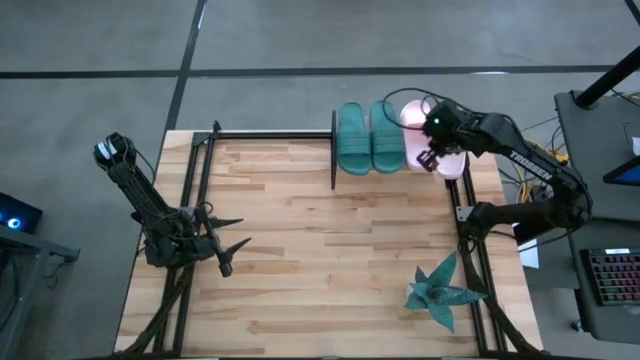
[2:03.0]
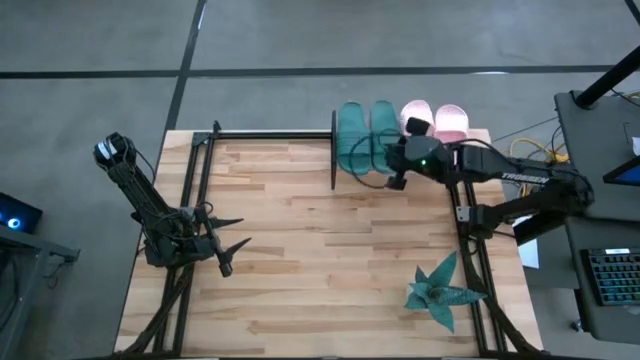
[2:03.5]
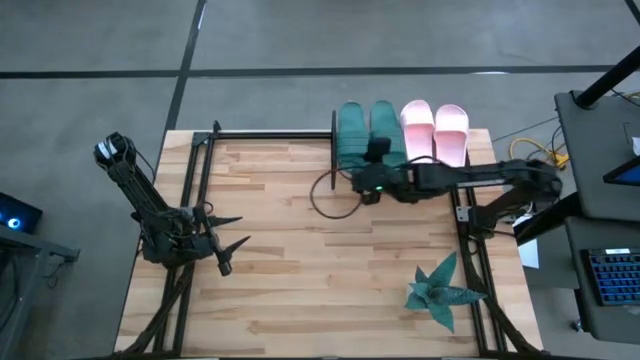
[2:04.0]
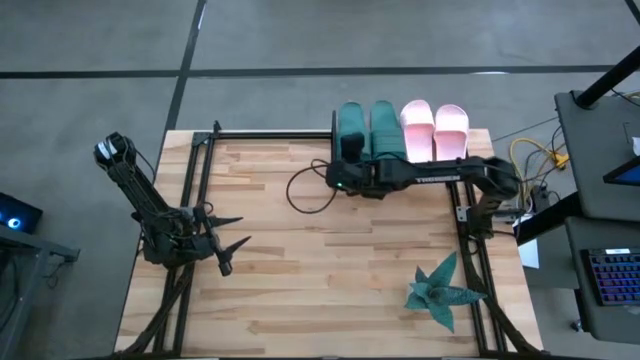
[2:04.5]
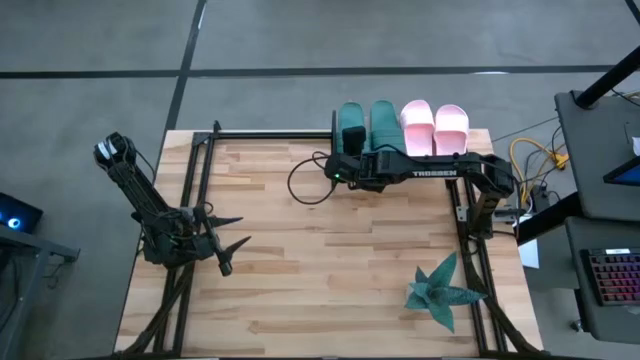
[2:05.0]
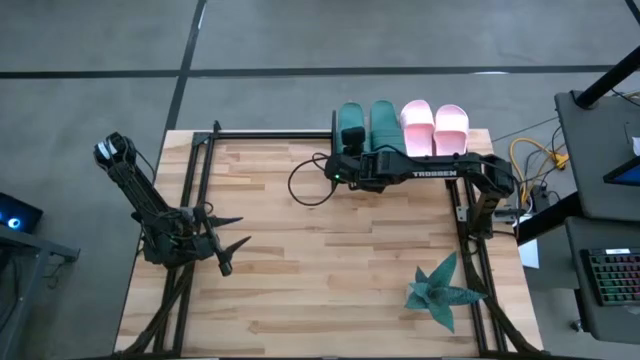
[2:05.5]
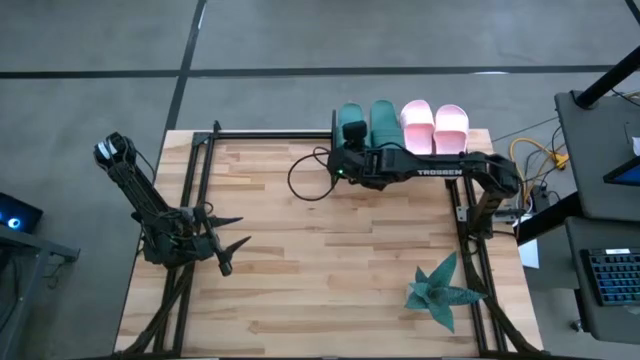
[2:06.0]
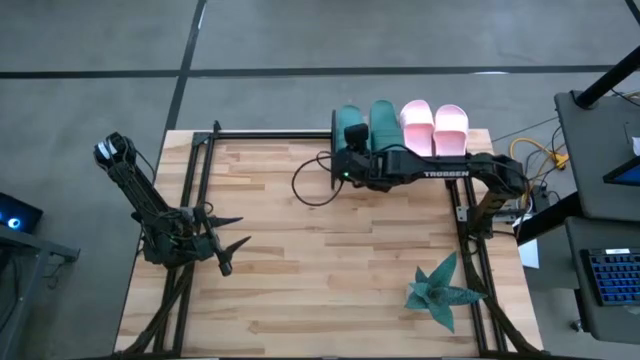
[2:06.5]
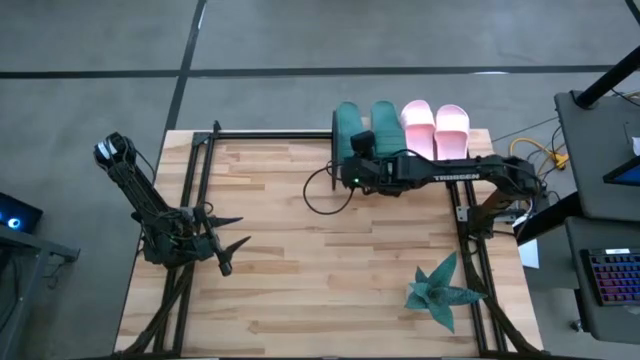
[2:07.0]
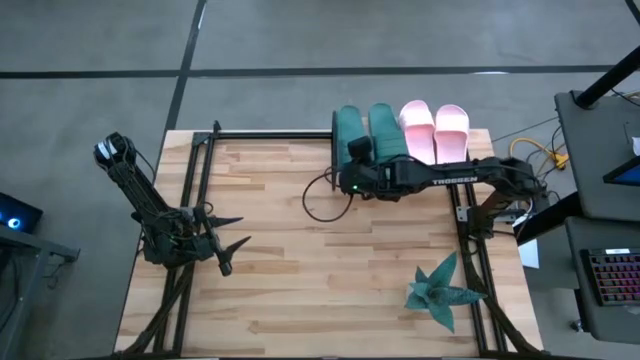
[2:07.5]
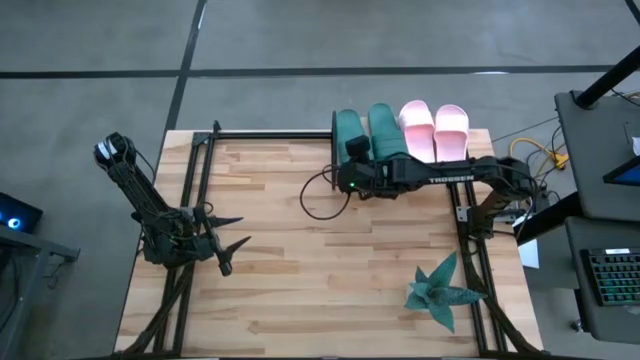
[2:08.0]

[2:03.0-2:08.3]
Task: Pick and place slides into the shelf
Adjust the left green slipper

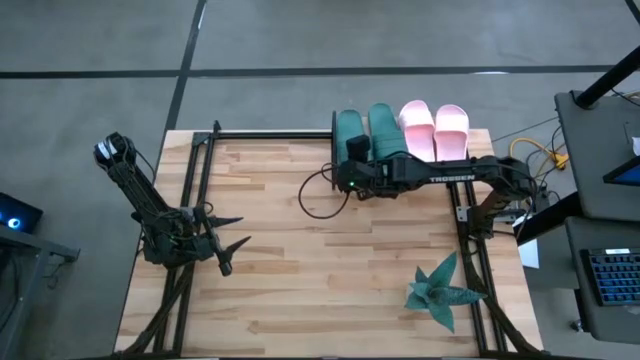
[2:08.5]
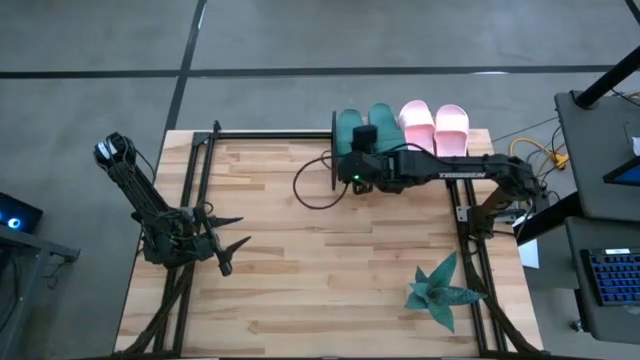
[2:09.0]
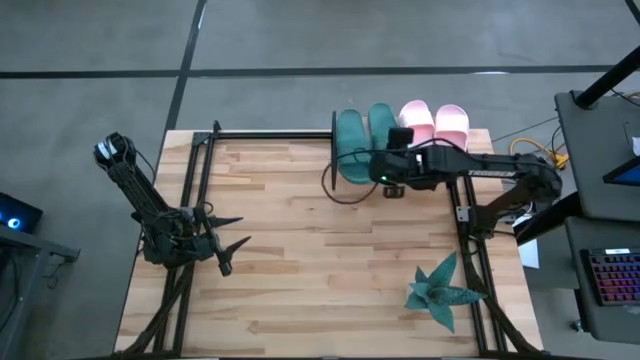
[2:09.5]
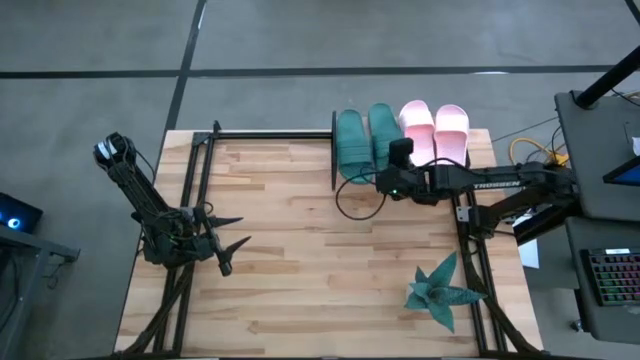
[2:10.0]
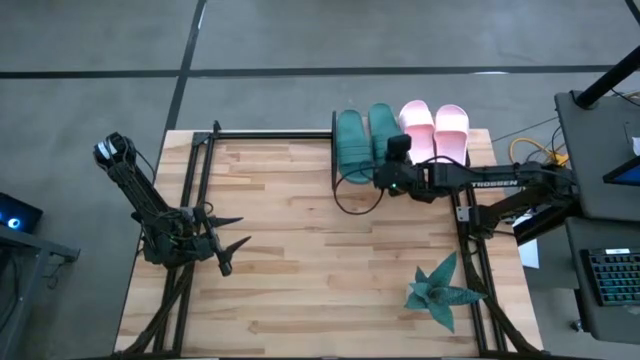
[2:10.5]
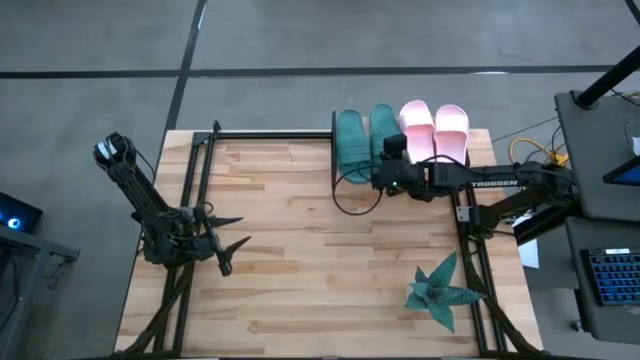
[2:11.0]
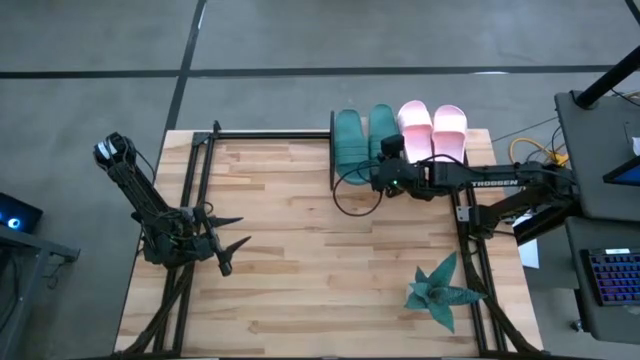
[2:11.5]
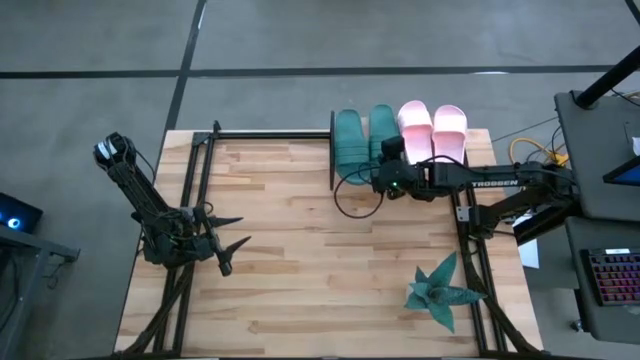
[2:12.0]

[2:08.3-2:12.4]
Adjust the right green slipper

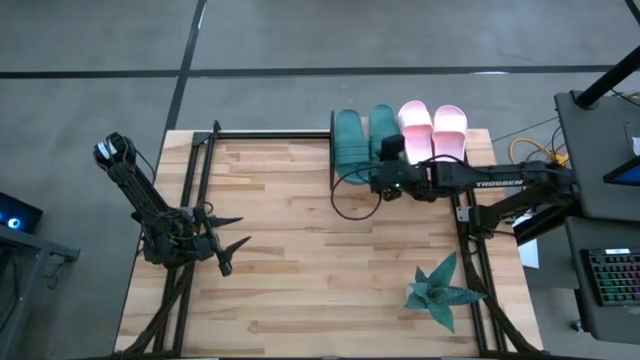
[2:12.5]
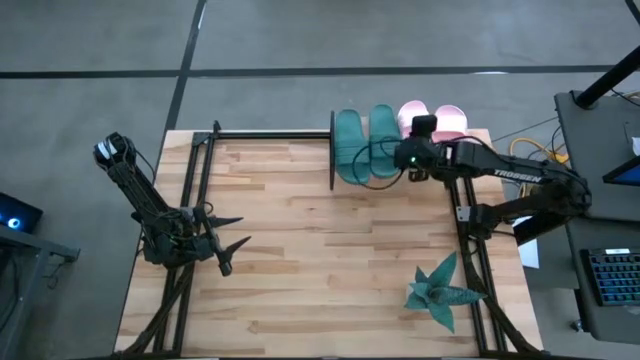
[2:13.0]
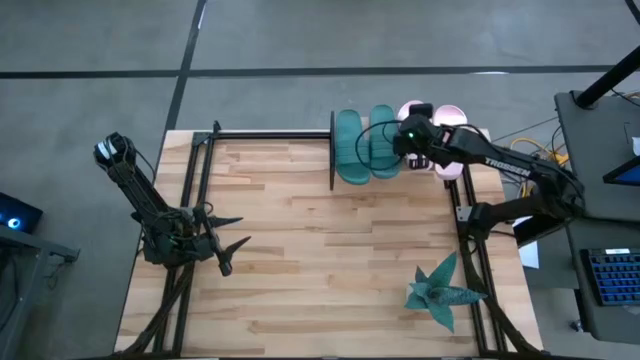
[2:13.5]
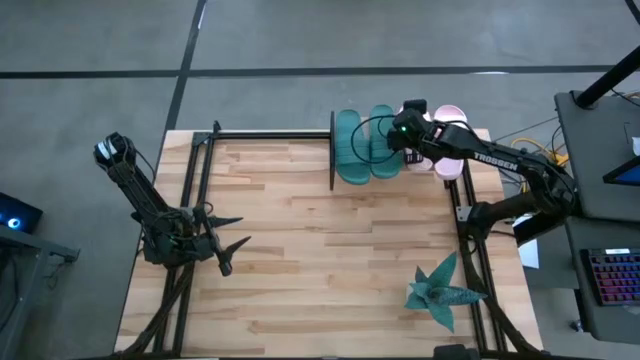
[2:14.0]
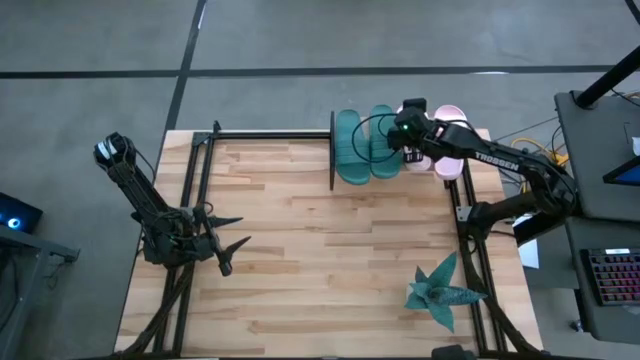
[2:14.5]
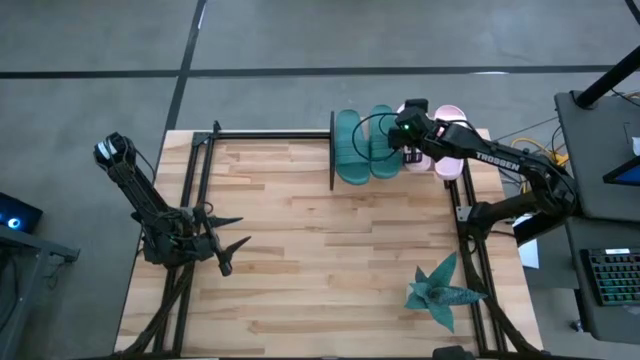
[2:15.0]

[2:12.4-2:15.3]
Adjust the left pink slipper

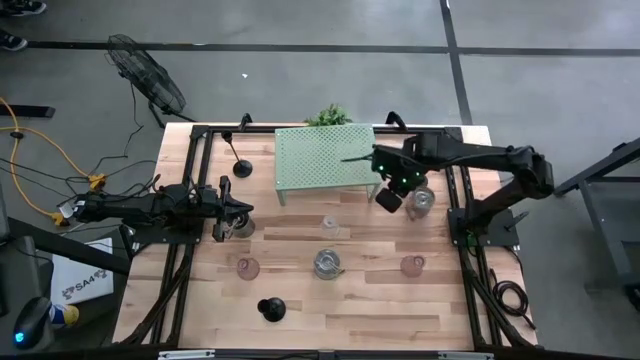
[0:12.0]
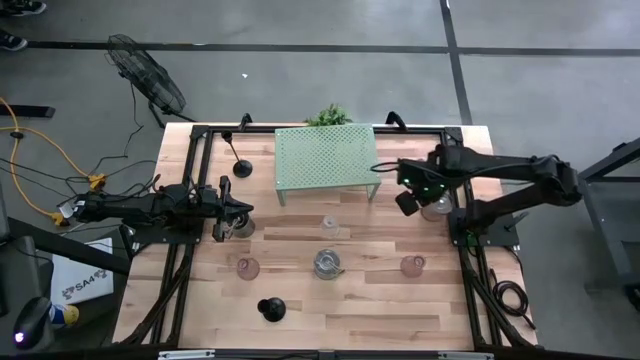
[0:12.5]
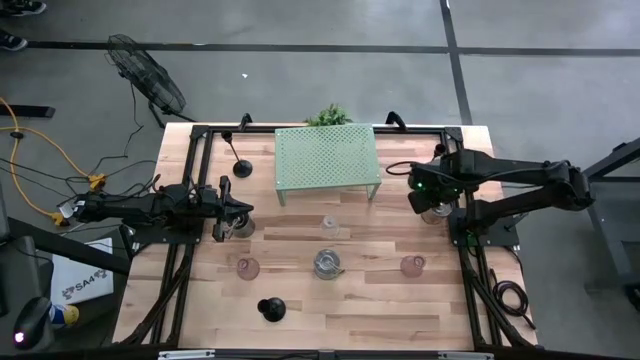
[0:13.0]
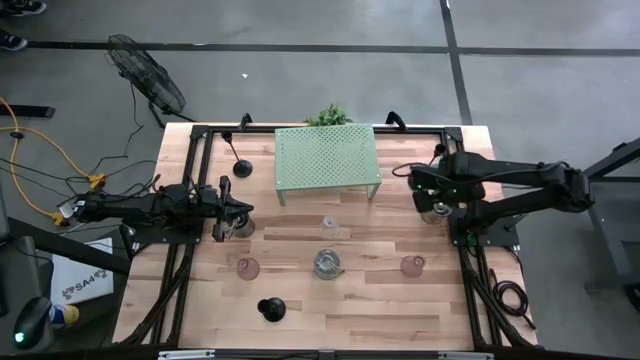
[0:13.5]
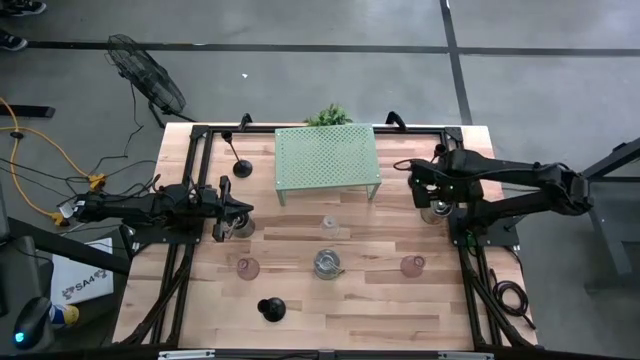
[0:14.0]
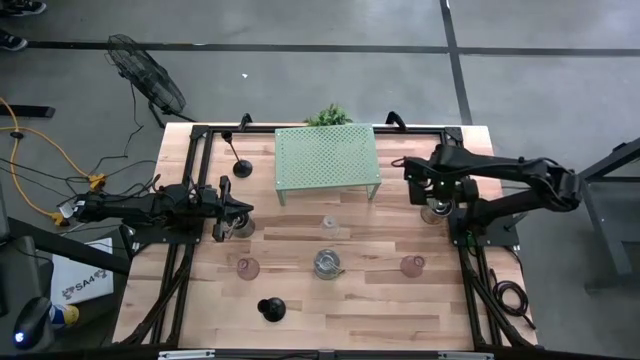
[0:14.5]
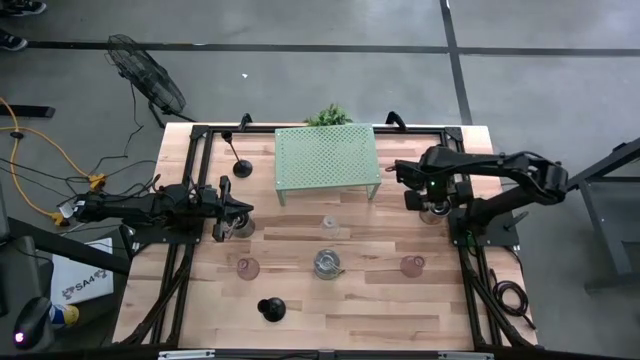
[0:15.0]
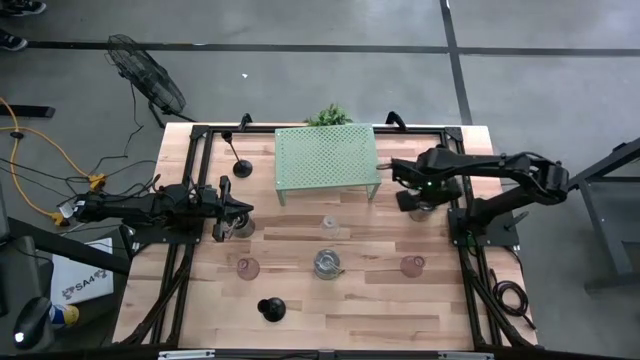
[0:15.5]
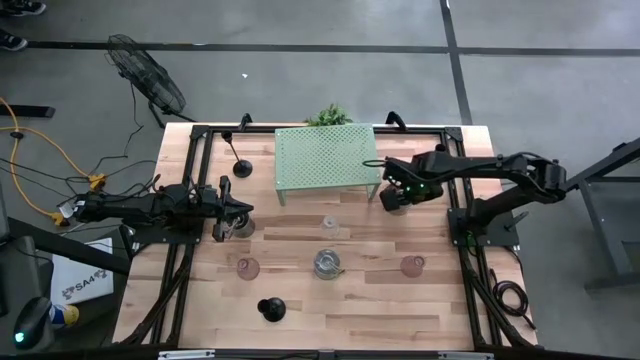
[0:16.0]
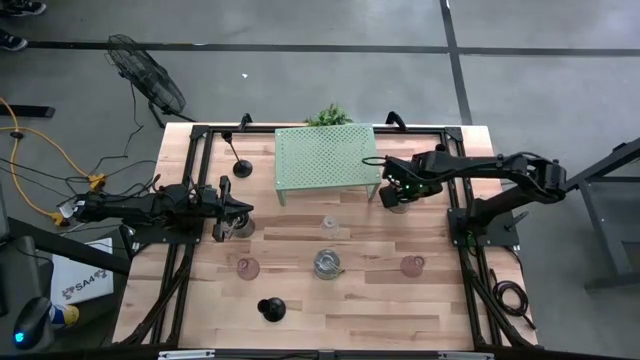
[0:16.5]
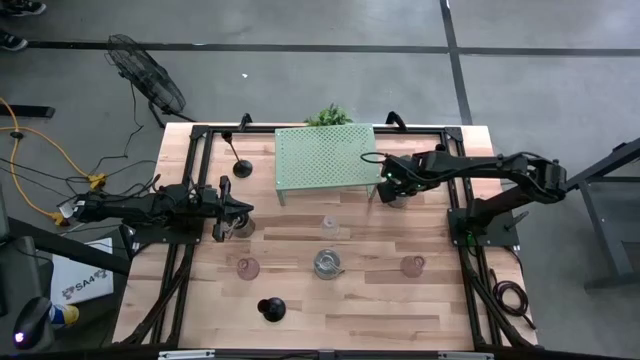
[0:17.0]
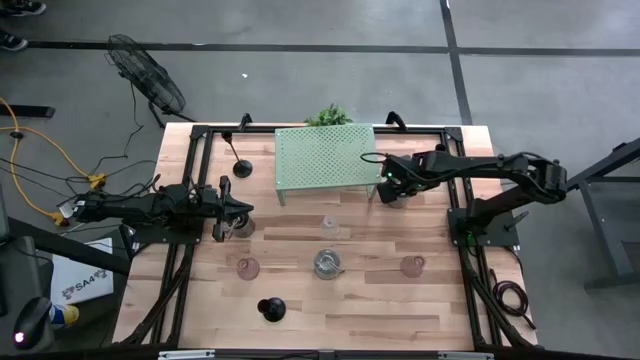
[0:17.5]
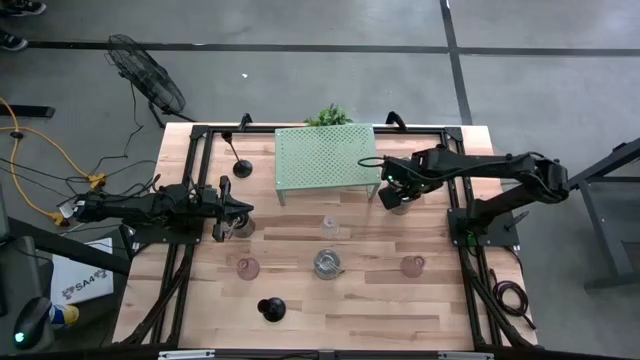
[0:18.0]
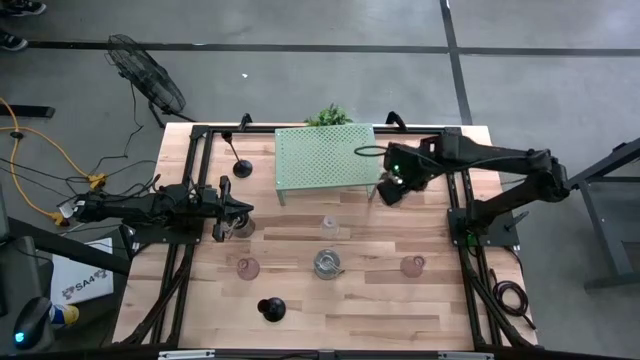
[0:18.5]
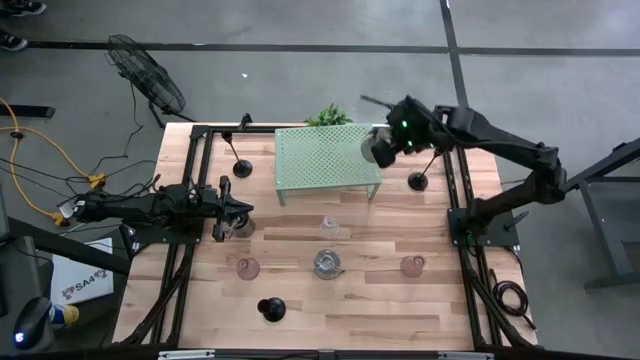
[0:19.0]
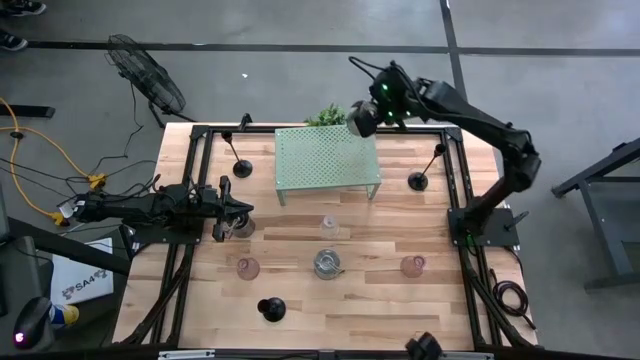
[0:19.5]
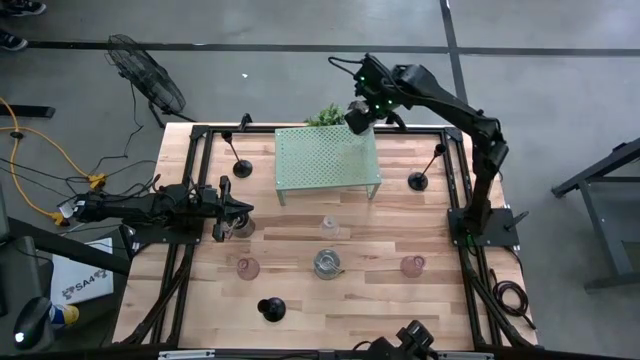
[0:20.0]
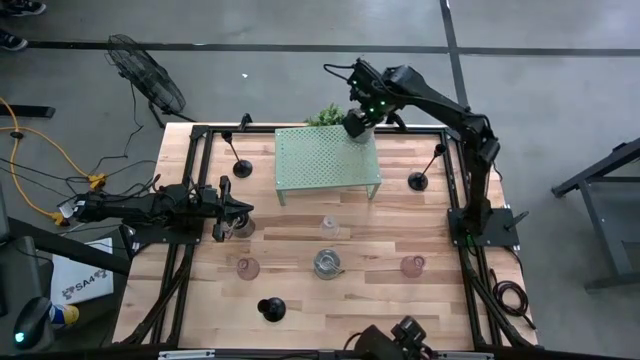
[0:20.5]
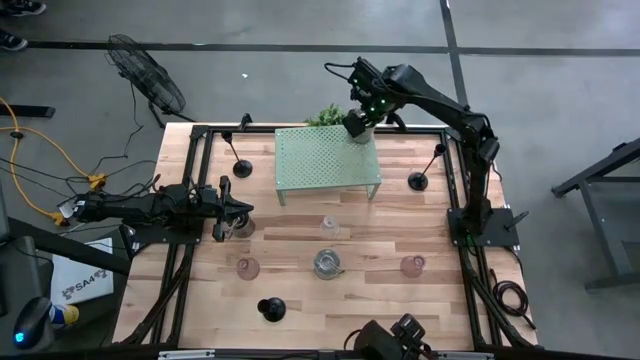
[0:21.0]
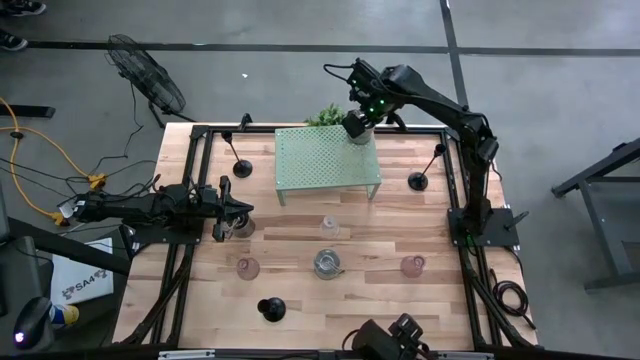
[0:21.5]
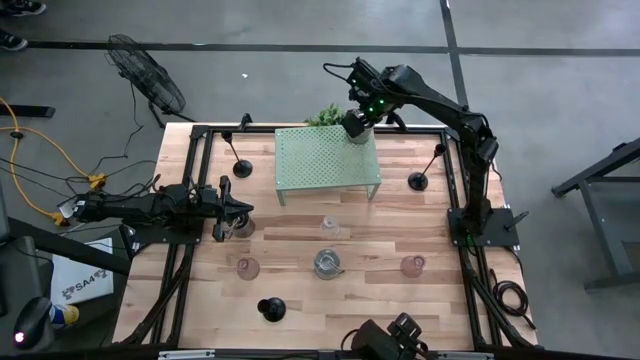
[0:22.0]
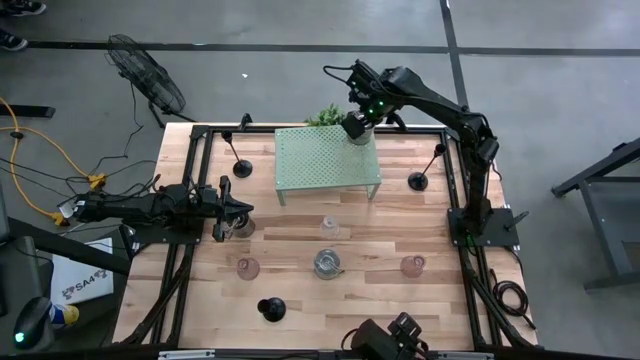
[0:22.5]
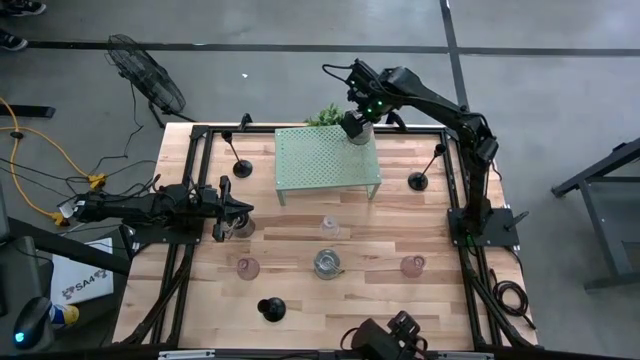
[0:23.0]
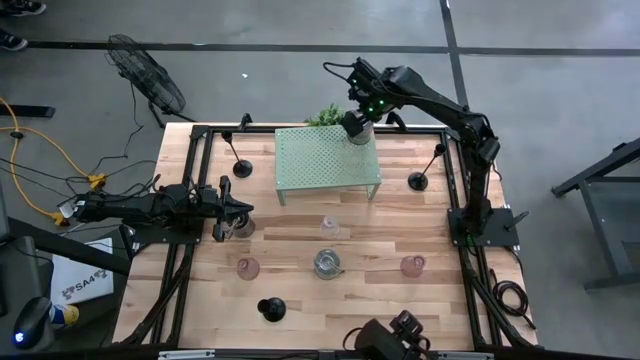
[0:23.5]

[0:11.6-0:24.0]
Task: Pick & Place candle stick holders
Put the top right silver scented candle on the shelf
